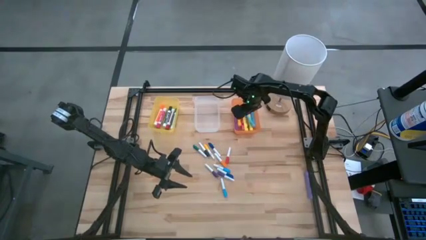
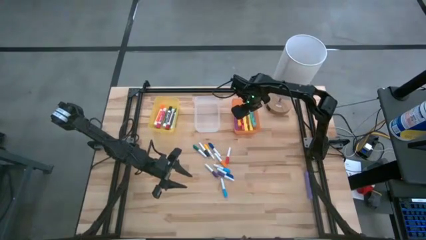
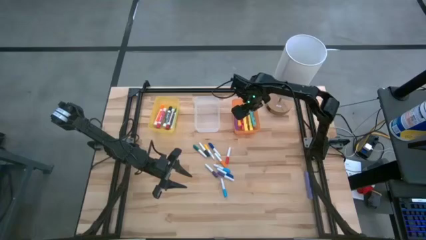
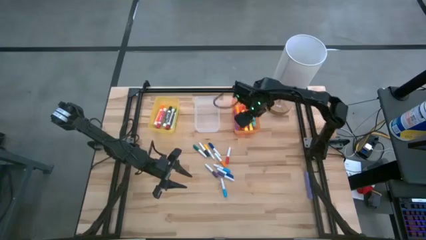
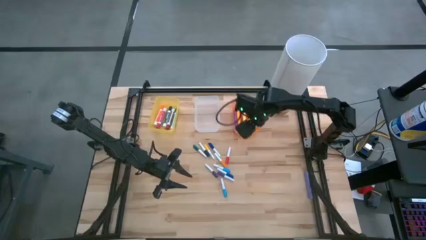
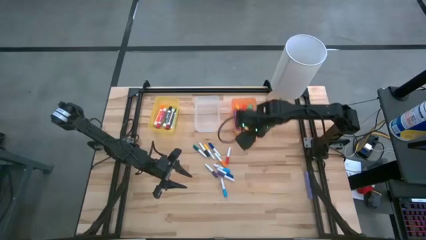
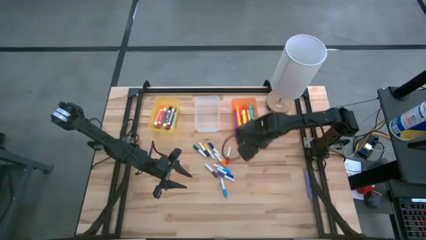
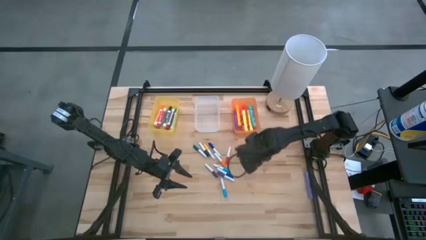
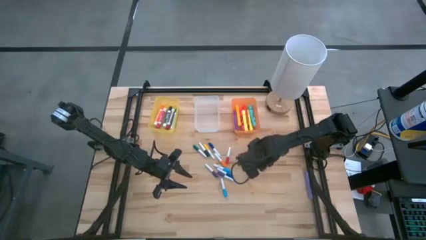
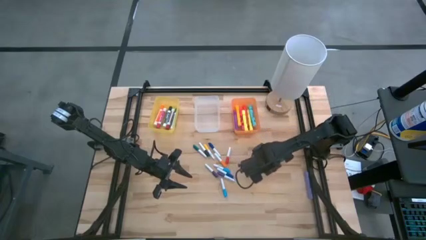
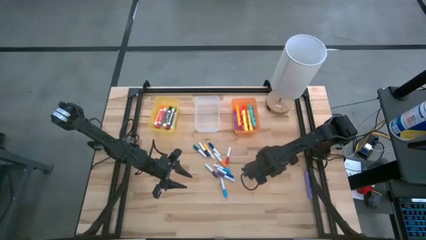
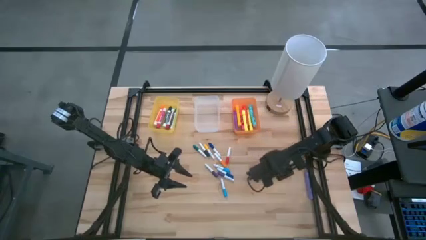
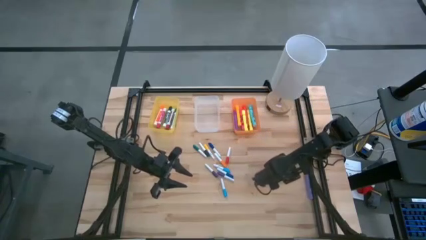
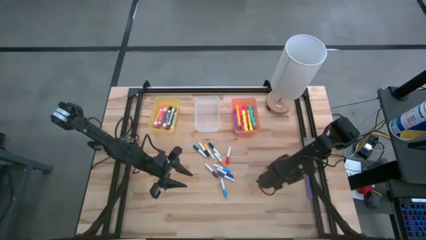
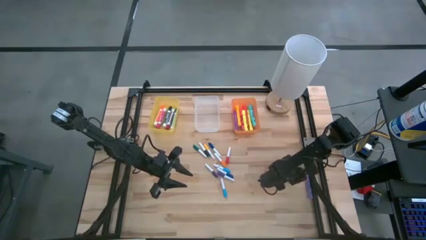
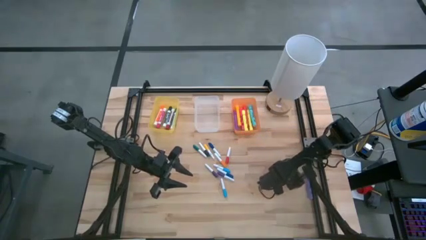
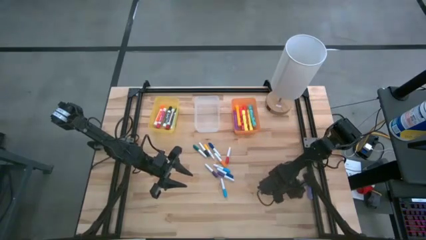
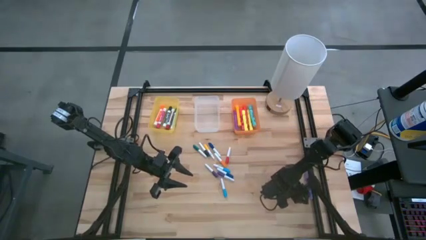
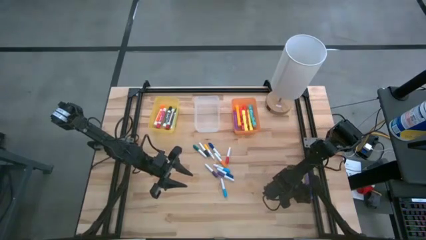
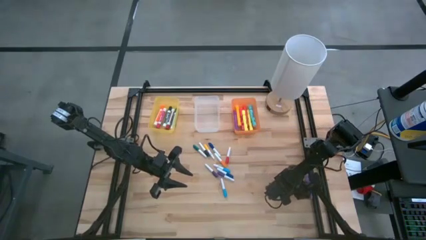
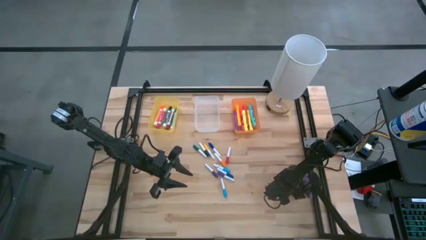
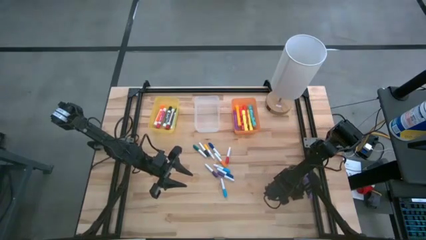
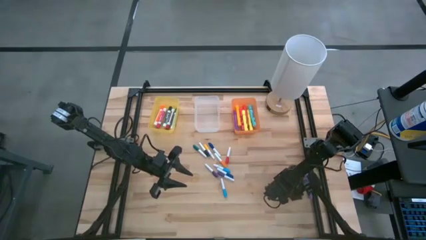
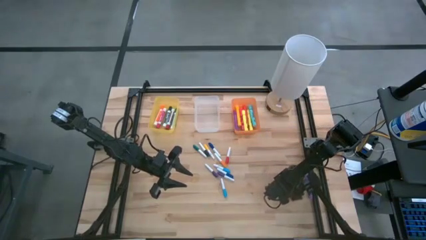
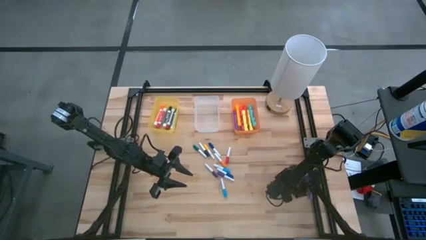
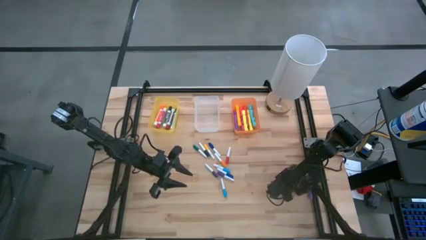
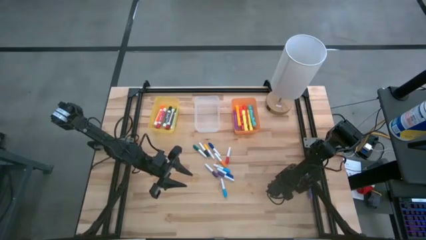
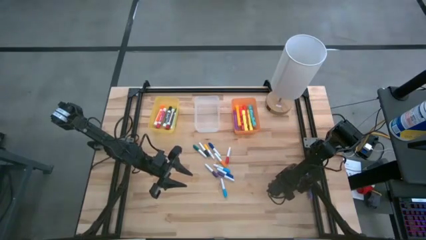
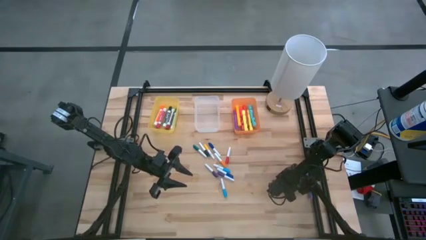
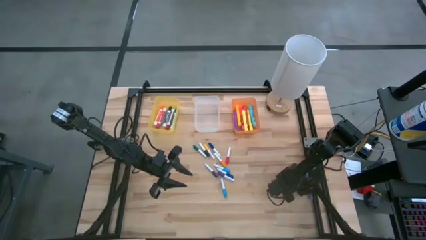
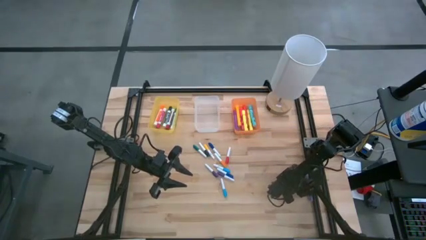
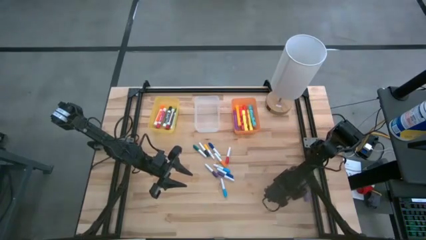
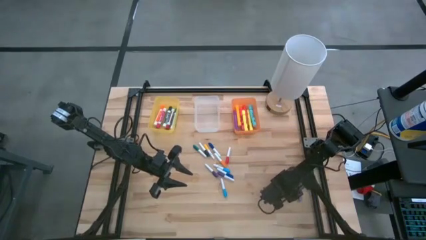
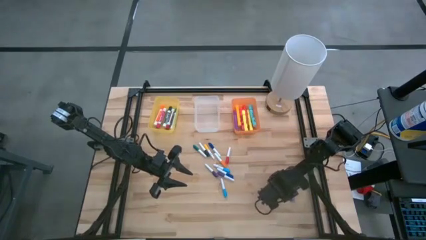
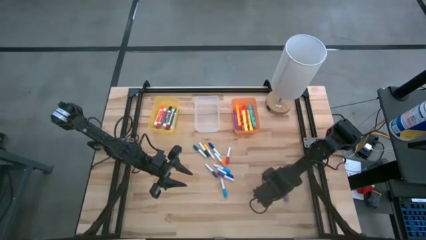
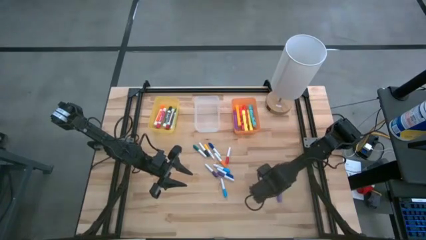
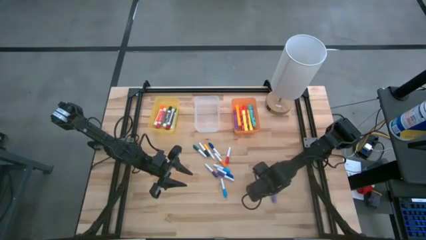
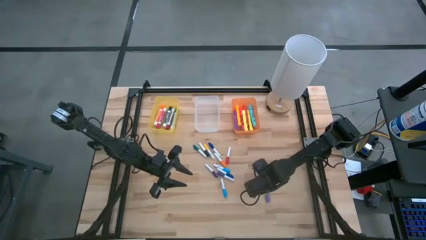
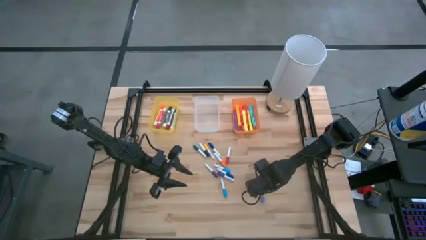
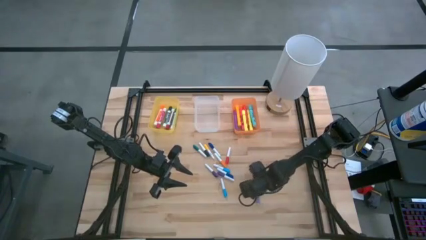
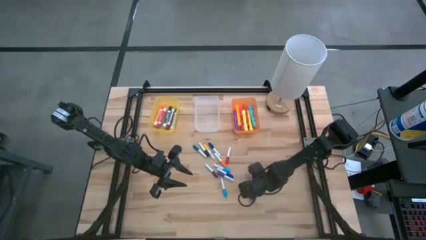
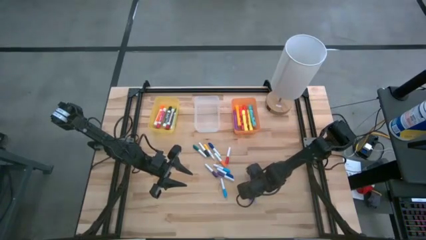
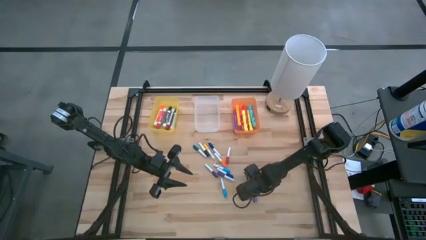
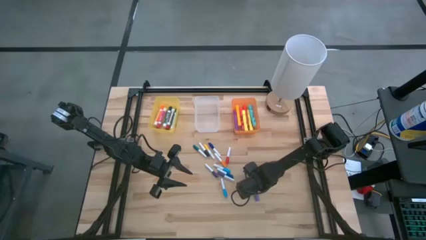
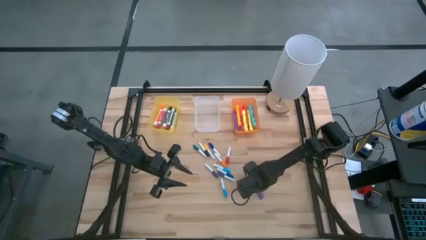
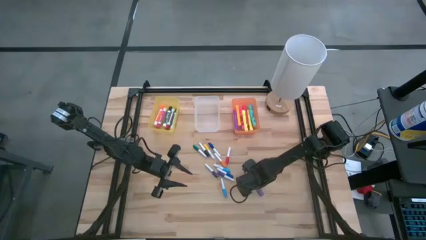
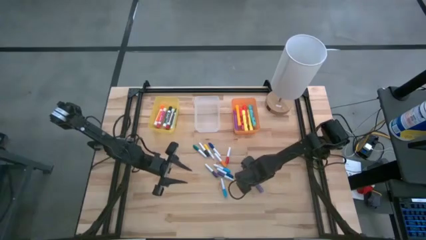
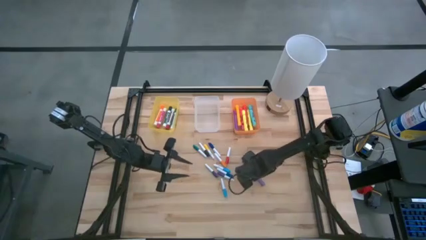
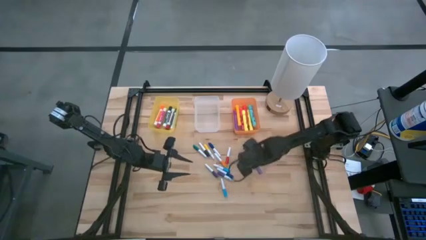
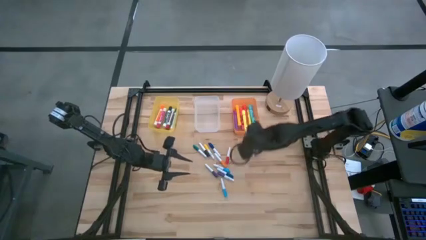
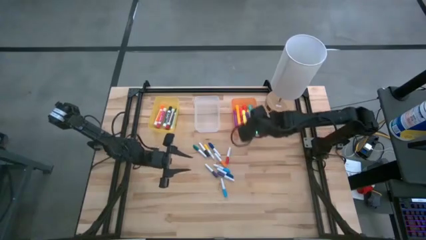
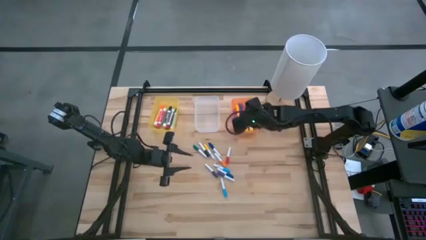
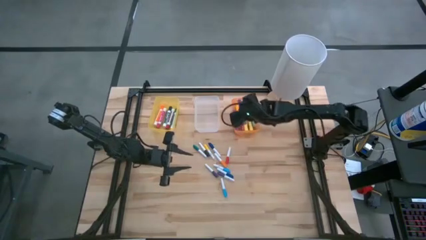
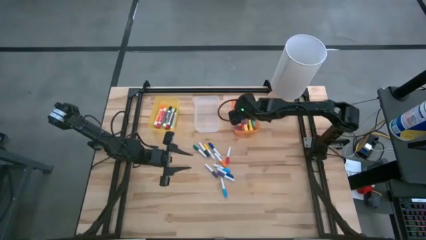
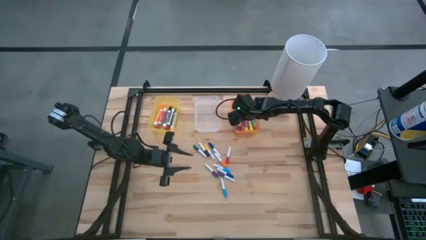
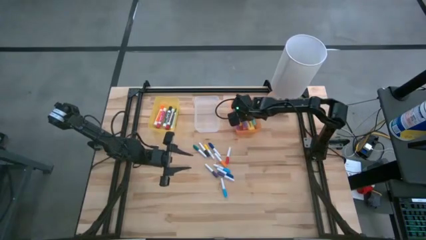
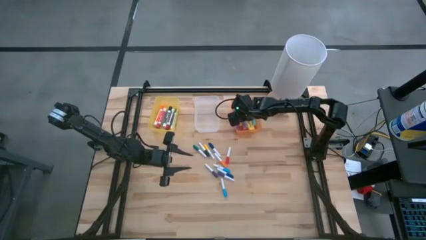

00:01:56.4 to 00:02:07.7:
Task: Pick & Place Markers
Put the large purple highlighter pen into the orange bin

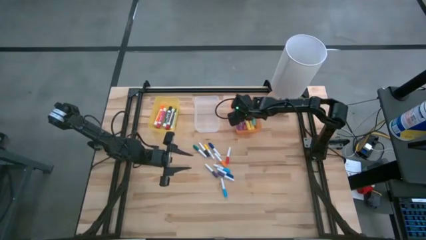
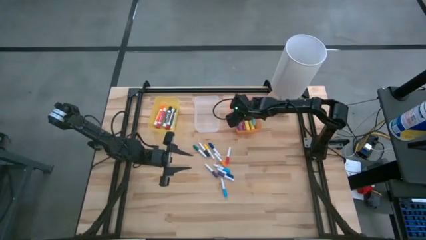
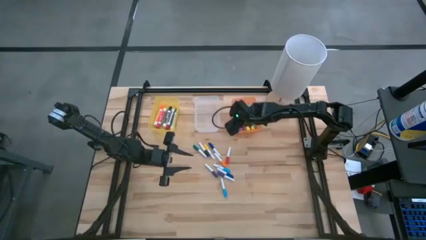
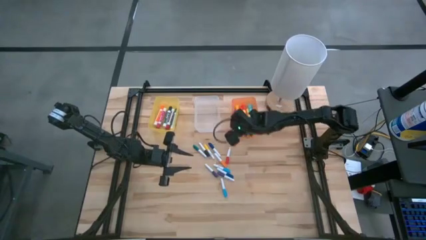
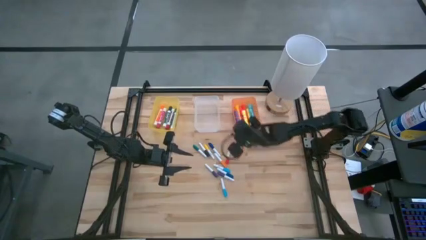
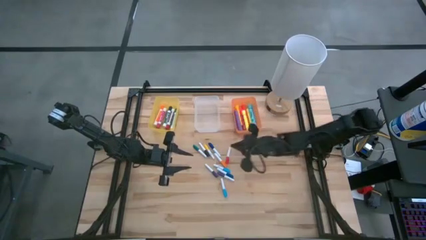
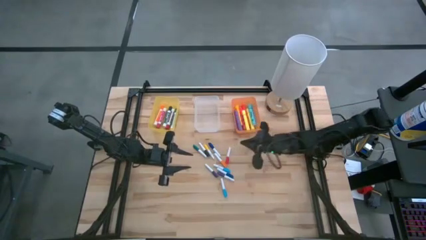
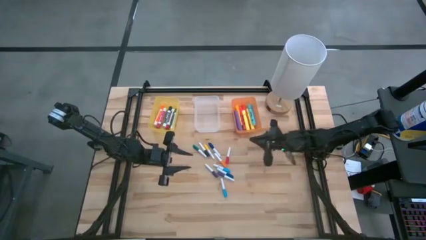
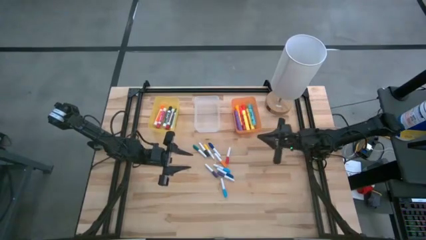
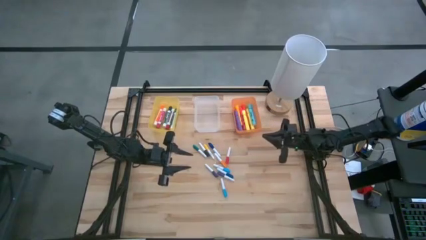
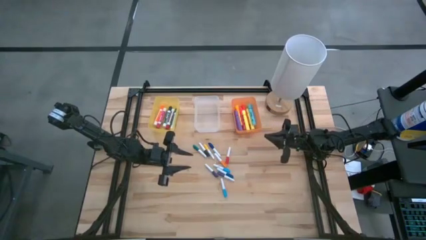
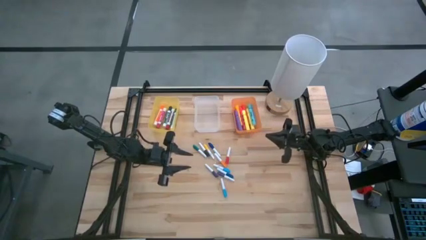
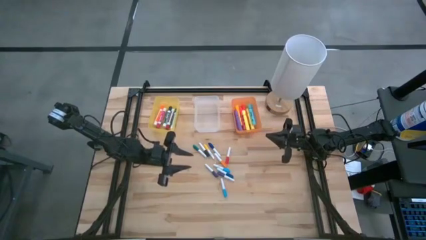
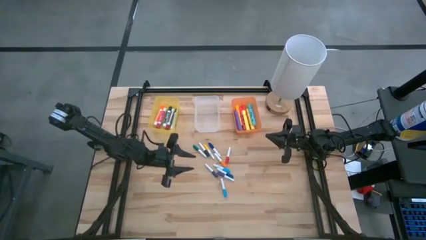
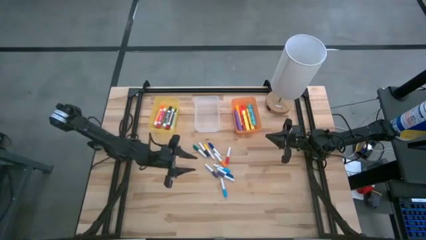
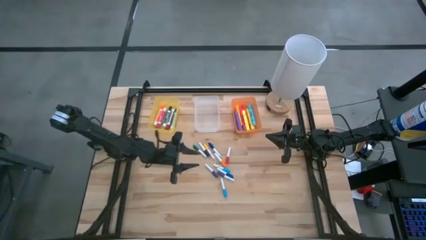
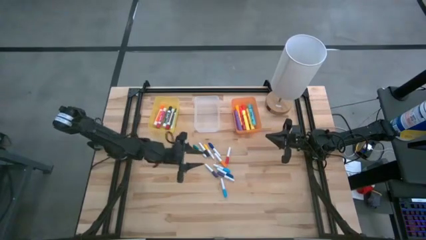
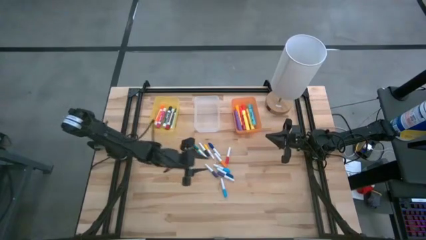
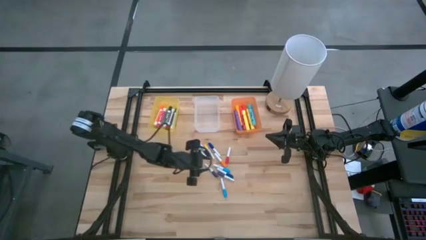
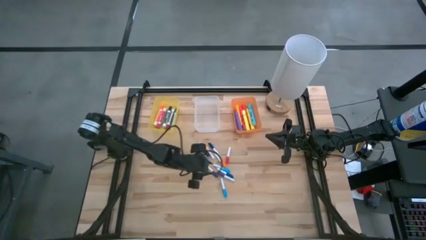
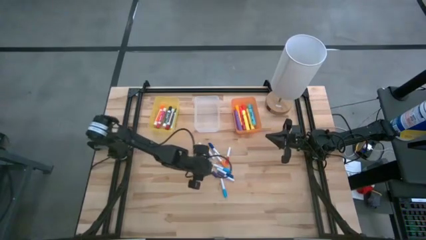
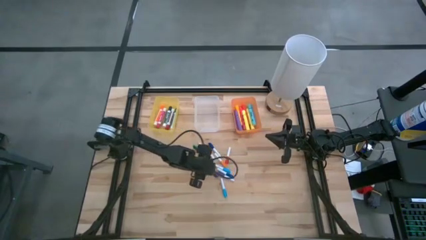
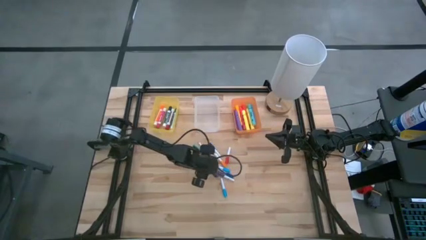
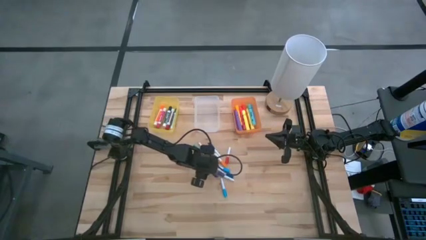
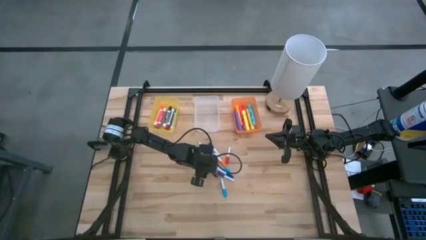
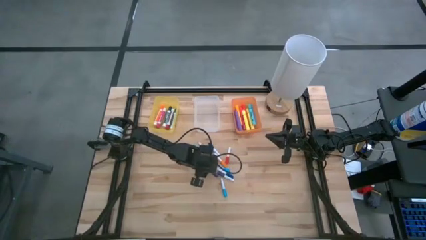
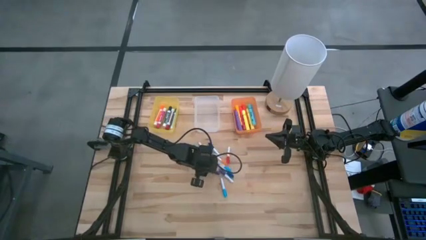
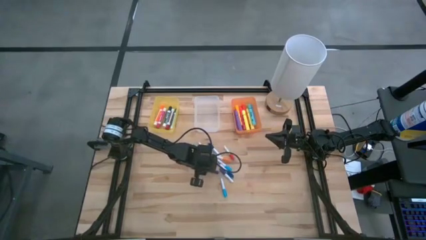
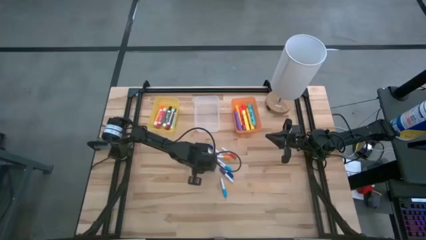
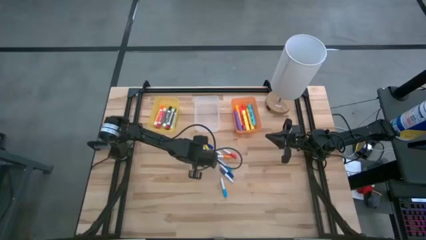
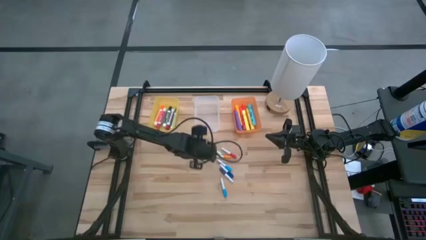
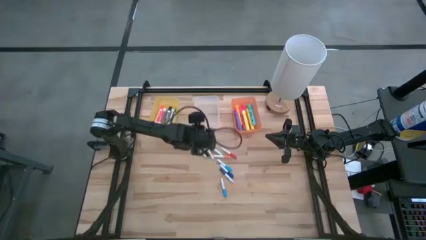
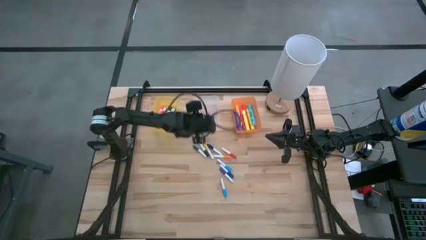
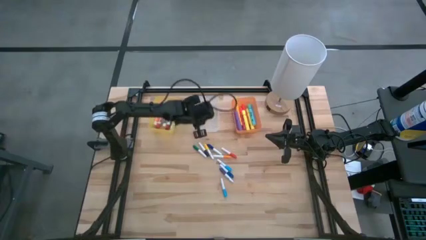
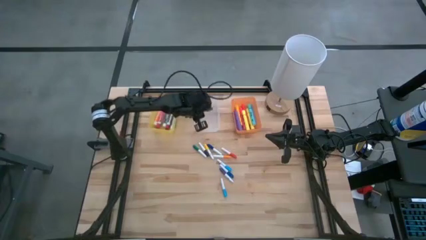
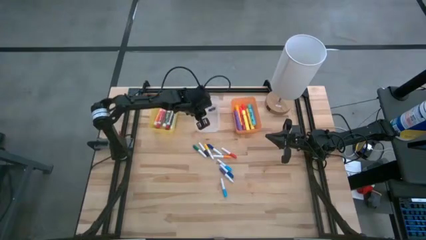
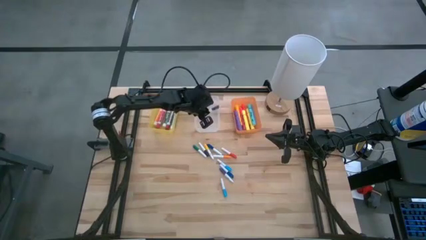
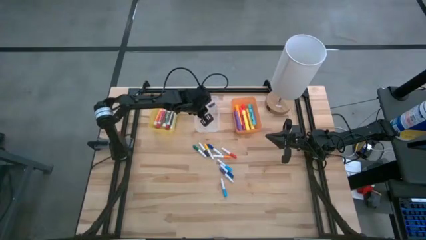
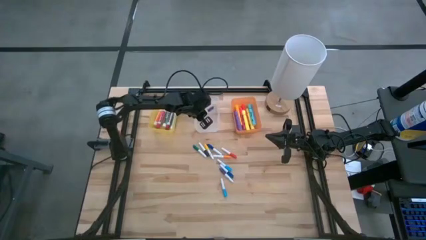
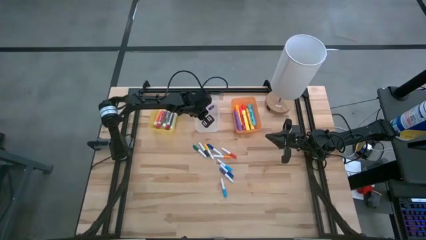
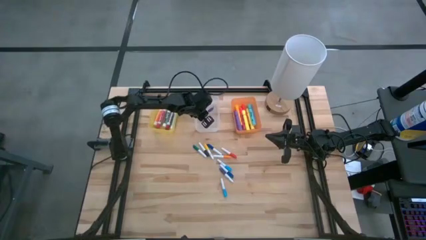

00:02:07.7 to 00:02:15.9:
Put the left small purple highlighter pen into the transparent bin
